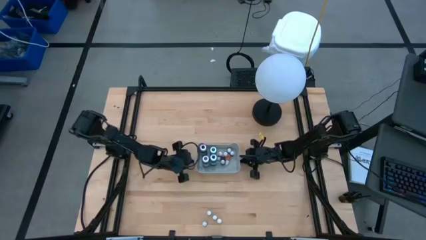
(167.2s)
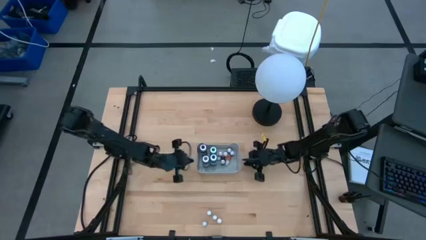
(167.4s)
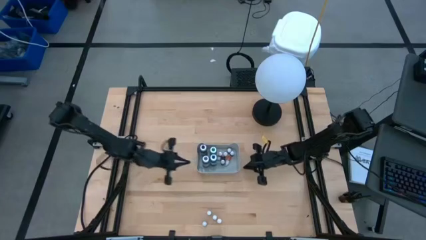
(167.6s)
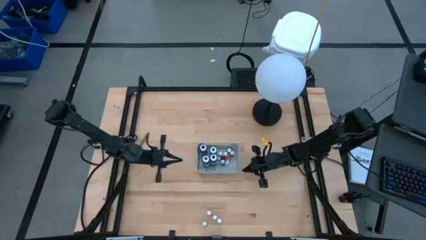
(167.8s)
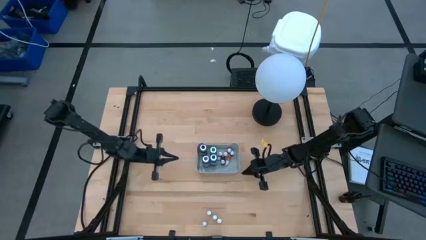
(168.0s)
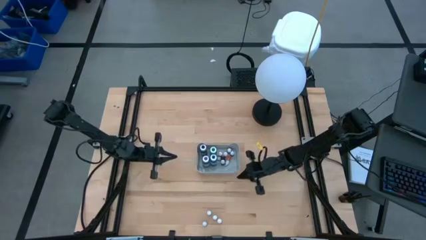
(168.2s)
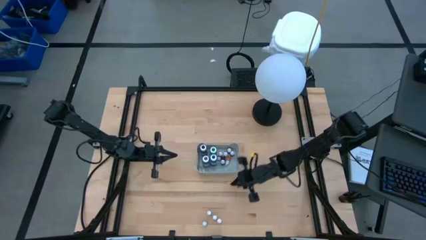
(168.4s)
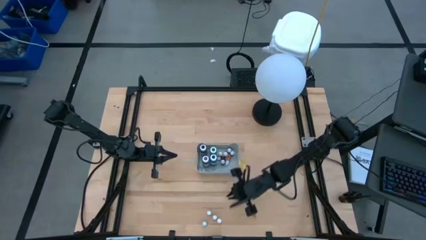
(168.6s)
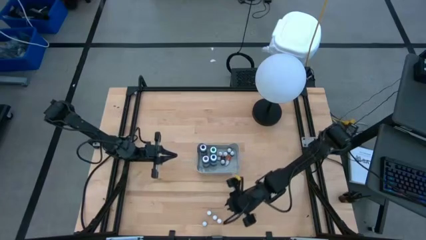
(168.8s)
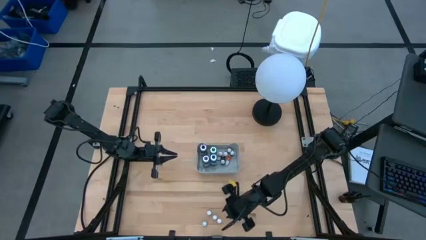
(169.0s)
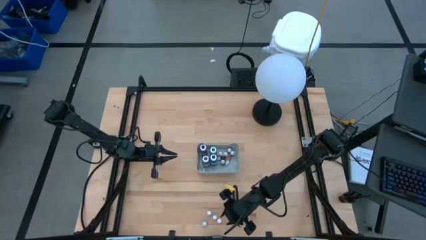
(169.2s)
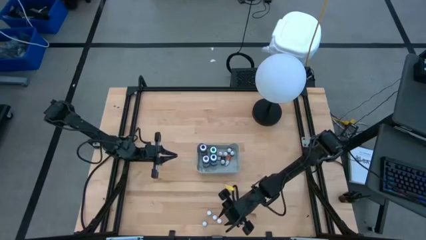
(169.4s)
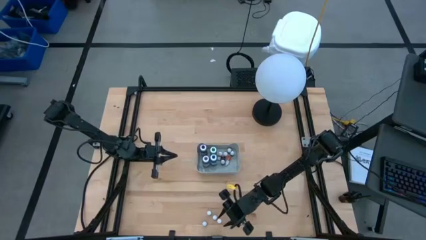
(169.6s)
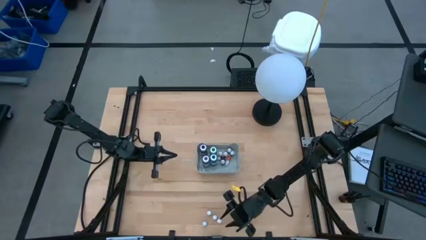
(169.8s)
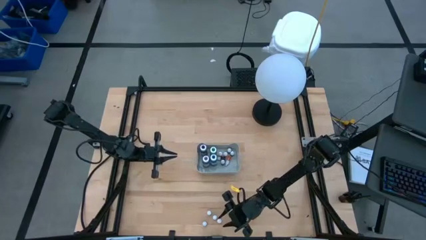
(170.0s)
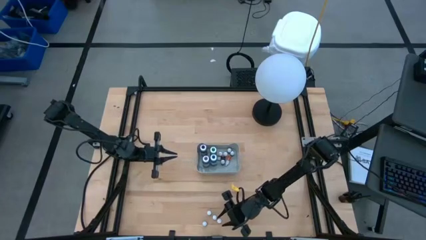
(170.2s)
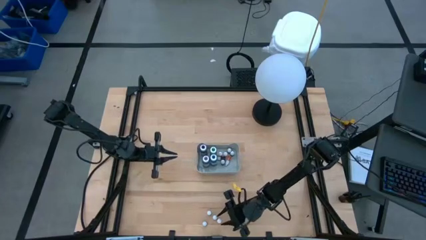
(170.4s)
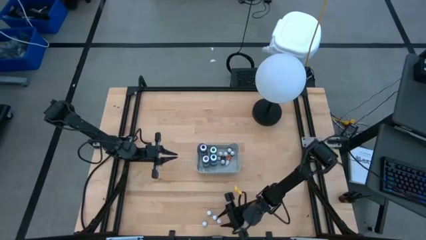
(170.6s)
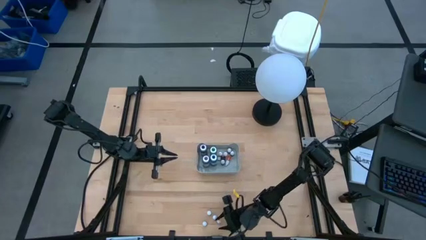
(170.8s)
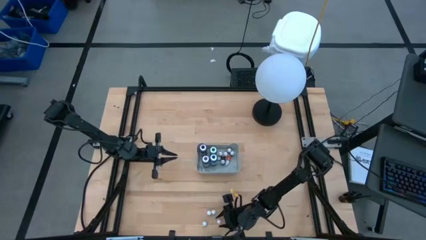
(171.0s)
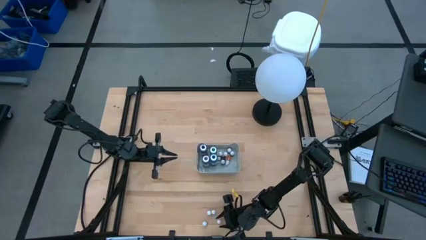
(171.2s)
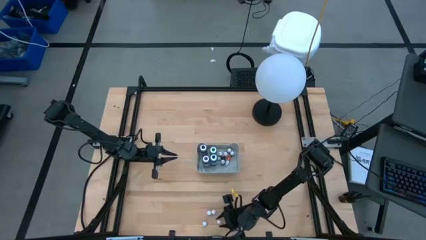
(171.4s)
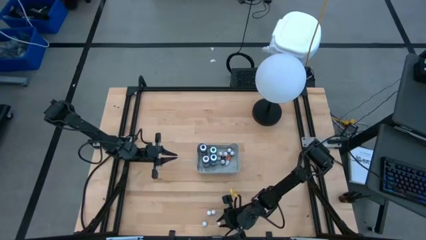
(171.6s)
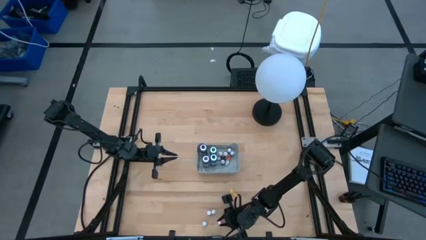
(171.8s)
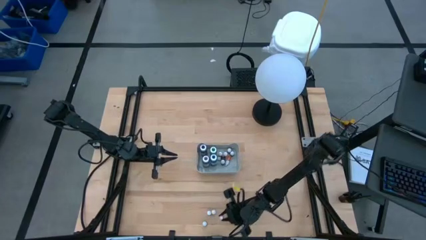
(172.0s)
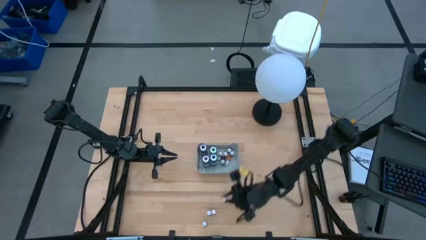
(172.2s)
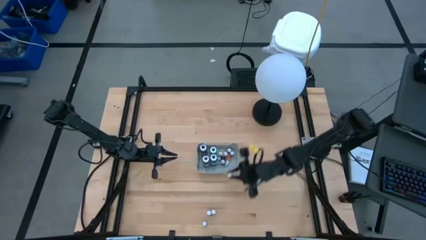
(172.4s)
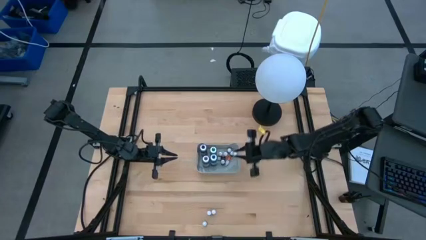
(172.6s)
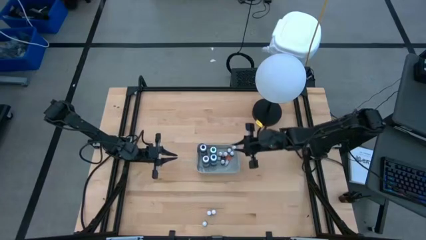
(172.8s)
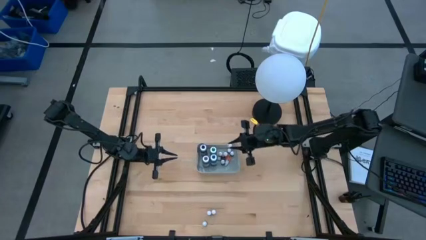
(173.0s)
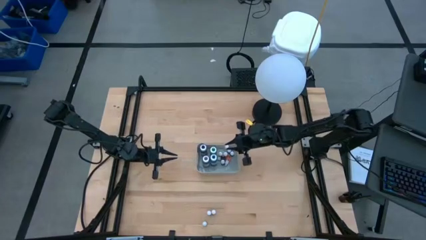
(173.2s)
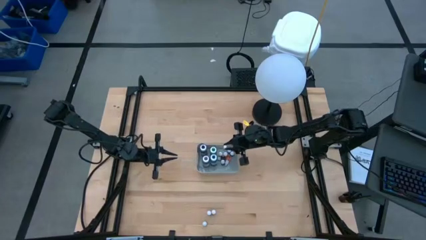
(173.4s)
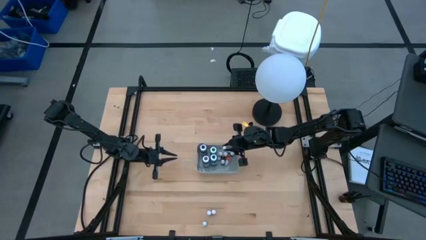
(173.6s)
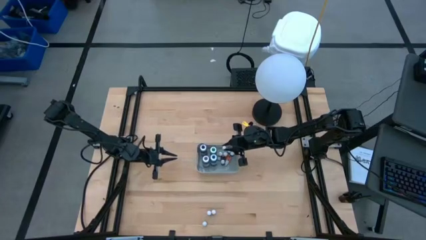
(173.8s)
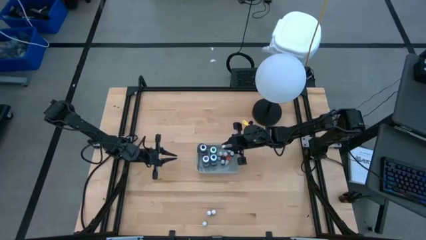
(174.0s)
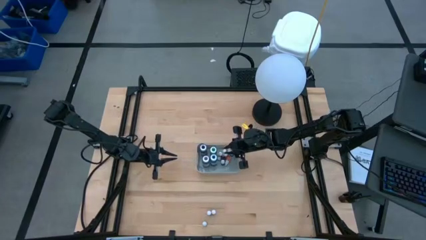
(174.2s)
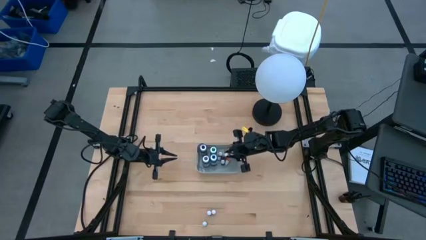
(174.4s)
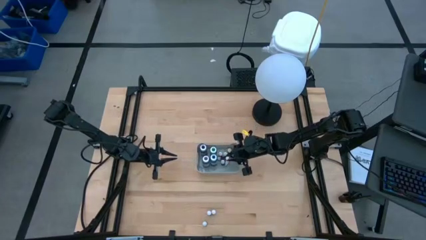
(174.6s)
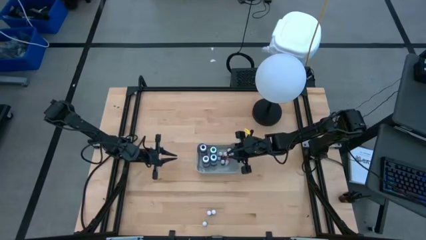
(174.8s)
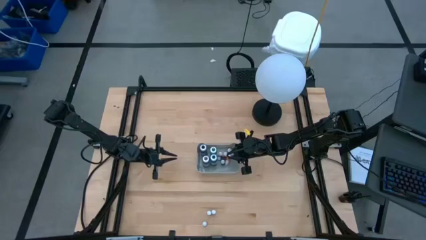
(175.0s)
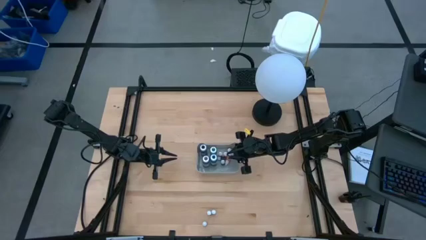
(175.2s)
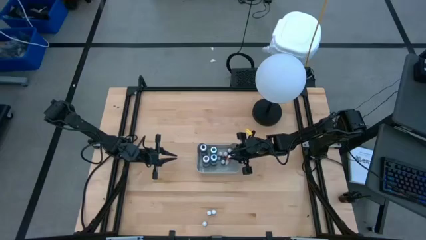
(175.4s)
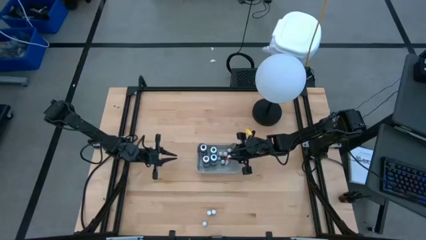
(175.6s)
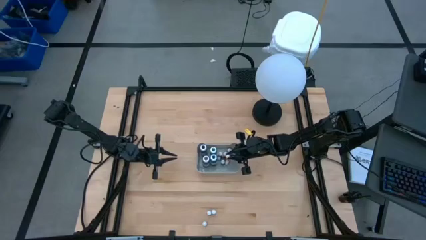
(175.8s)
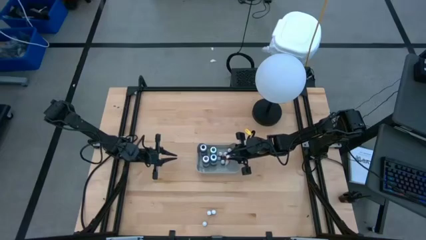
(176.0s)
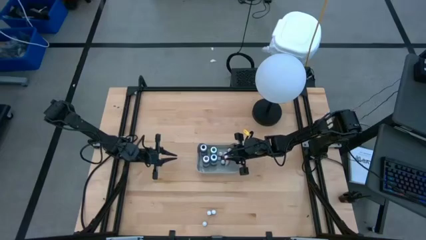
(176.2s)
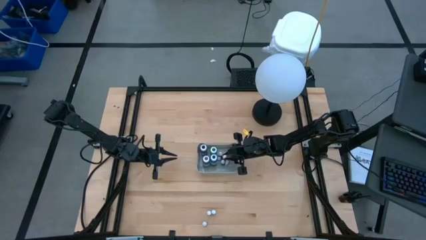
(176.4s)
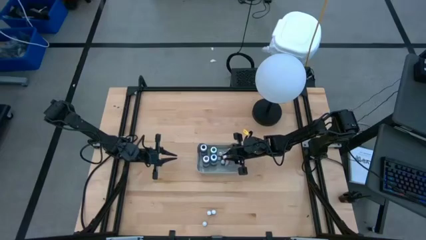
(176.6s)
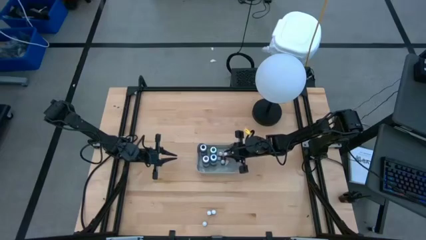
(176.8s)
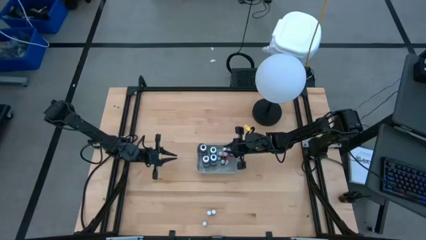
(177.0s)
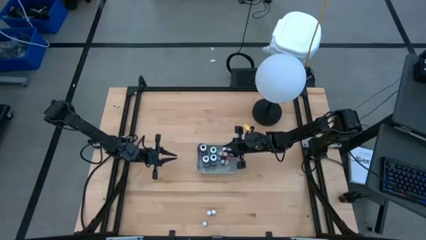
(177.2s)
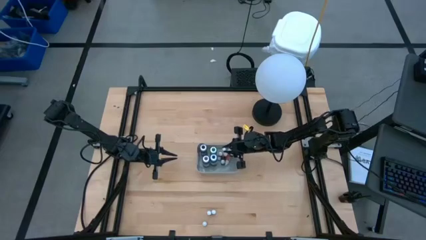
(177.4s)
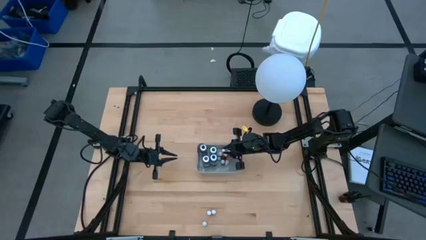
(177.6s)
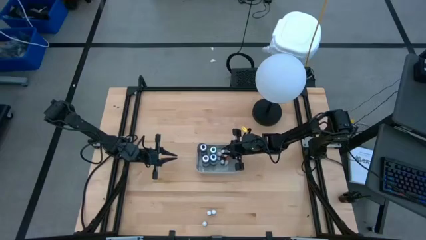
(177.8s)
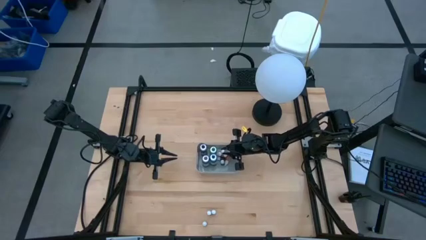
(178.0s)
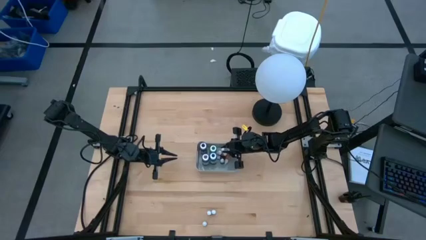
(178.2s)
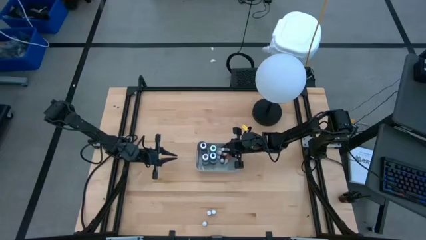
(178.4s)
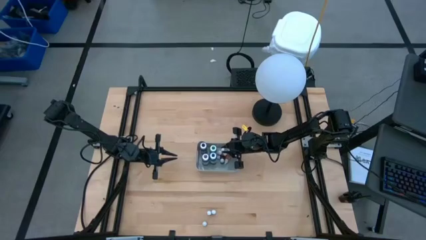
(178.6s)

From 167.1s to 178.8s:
Task: Pick & Place food coloring
Put the small orange food coloring bottle into the gray bin

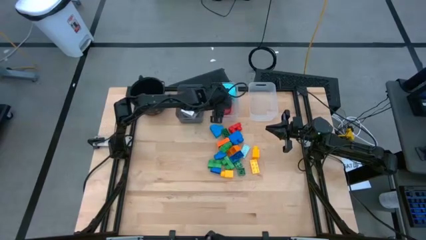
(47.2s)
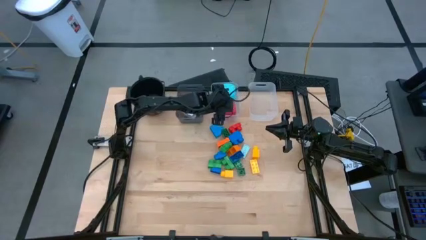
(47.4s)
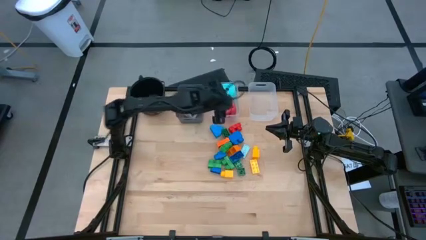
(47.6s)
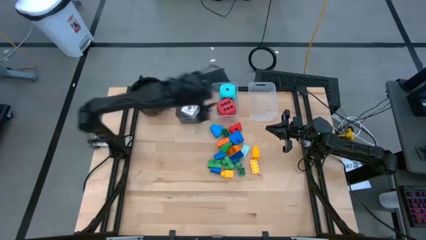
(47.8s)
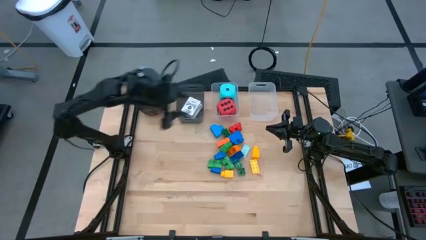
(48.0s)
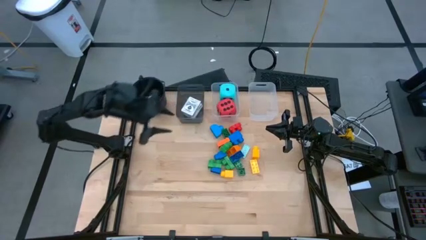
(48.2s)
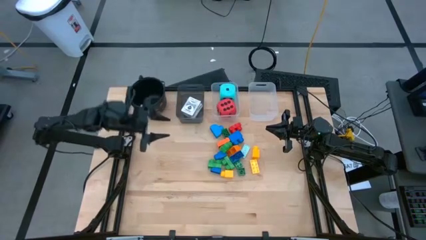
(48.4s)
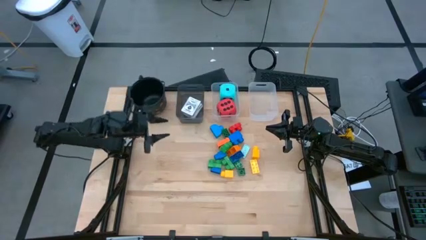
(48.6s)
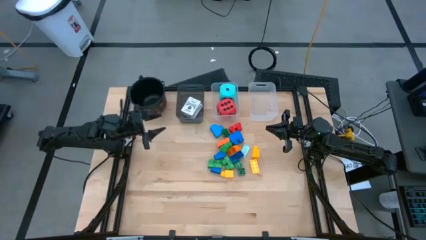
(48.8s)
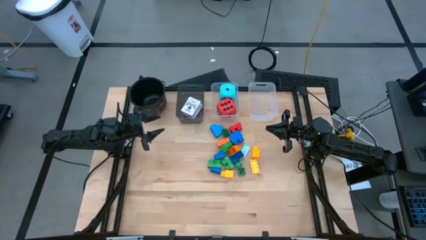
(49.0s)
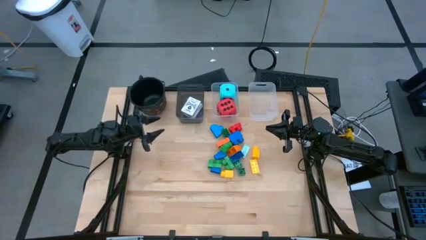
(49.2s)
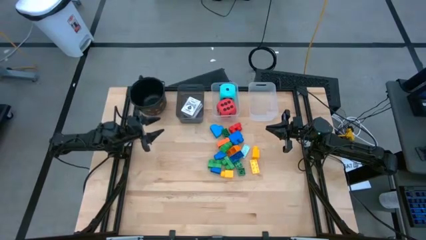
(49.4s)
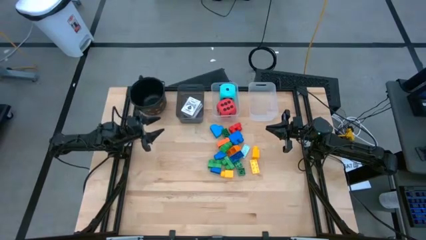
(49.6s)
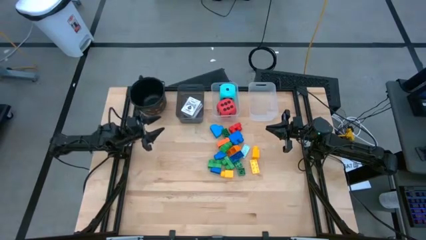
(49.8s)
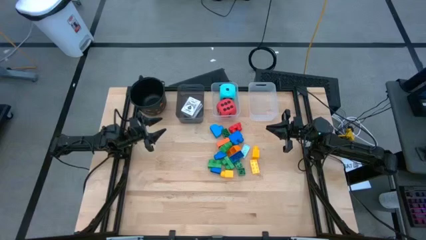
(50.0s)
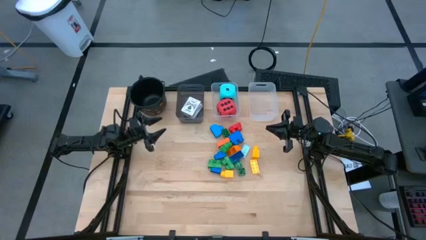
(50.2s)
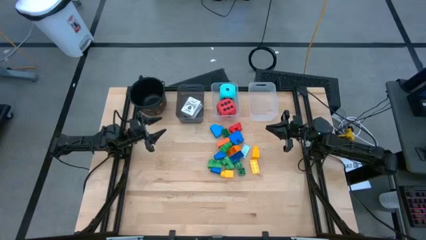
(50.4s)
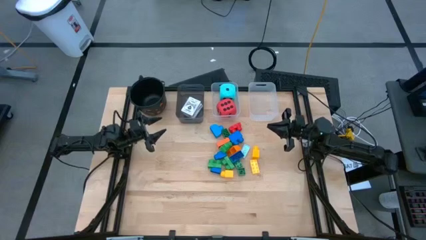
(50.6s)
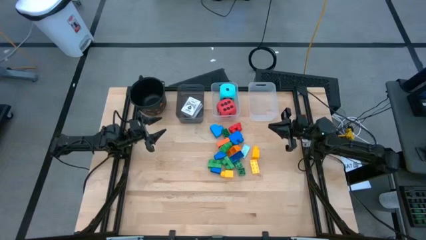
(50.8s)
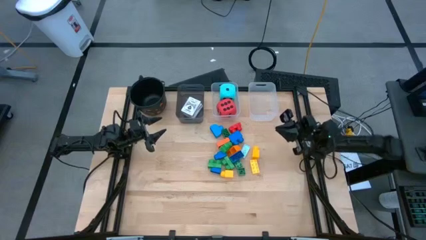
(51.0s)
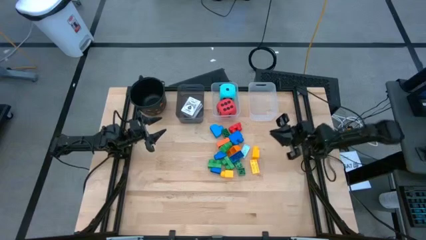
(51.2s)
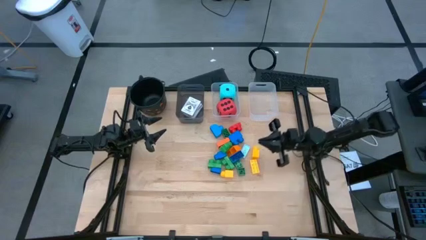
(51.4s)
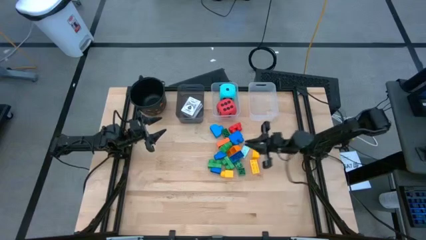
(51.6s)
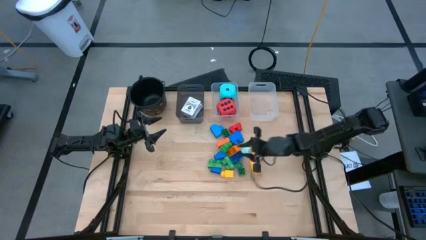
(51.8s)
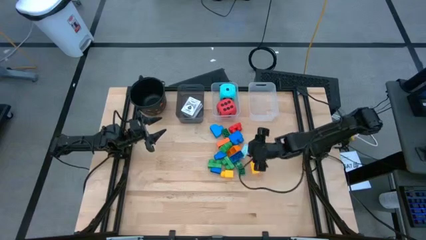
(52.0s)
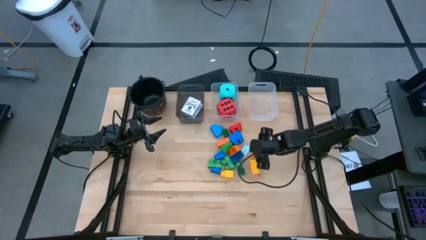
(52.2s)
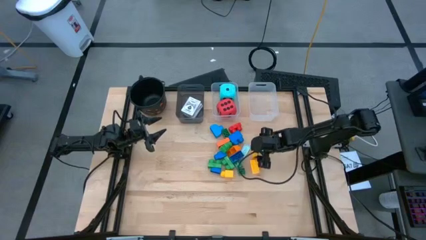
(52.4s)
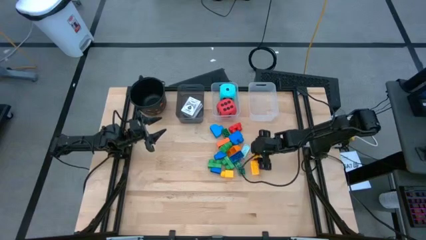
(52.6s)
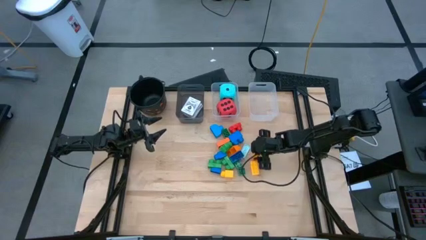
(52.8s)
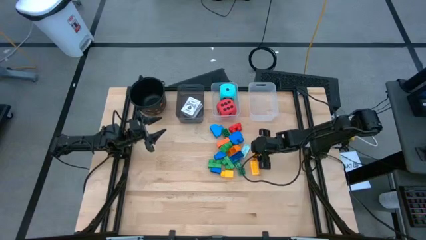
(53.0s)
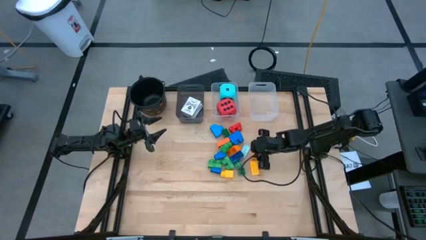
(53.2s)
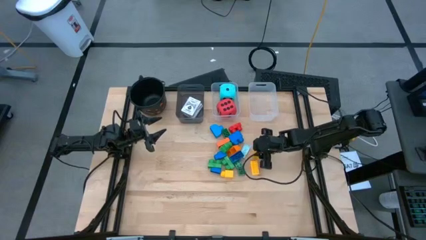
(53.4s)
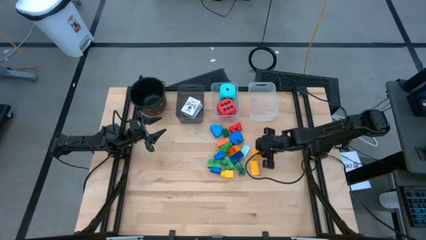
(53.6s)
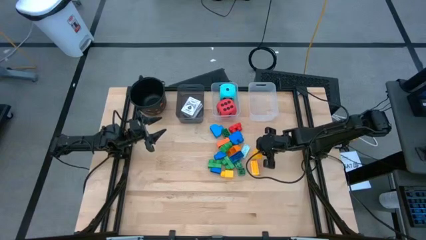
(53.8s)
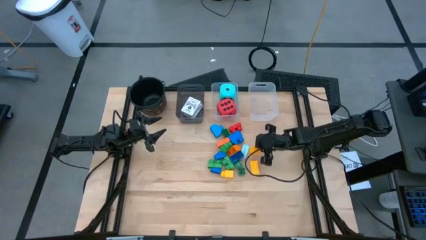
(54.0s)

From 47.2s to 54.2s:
Task: Pick & Place Toys
Put the right yellow one stud game piece into the right transparent bin
